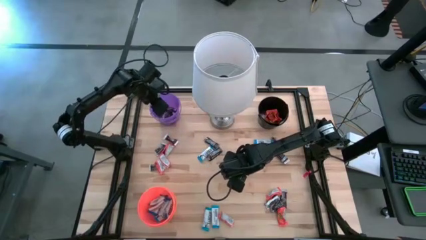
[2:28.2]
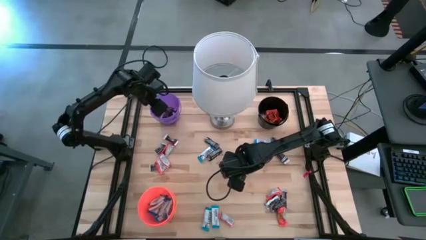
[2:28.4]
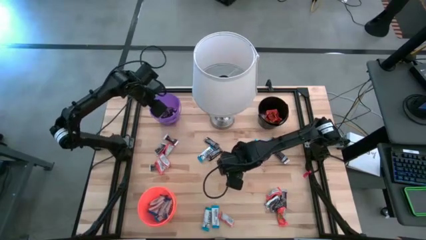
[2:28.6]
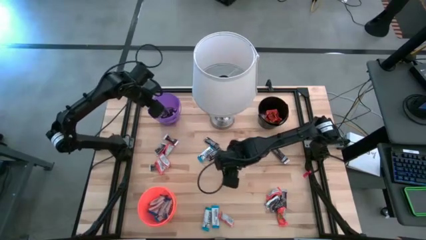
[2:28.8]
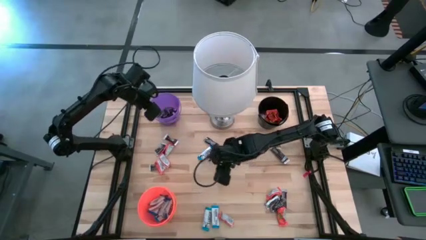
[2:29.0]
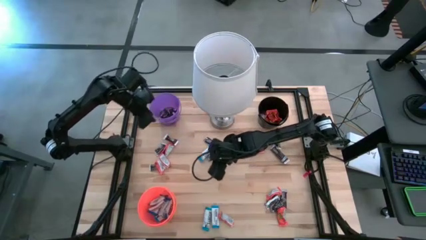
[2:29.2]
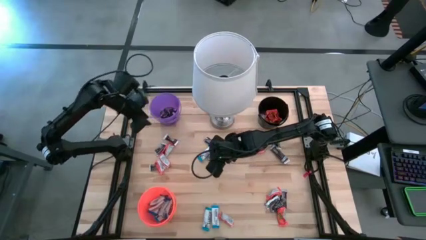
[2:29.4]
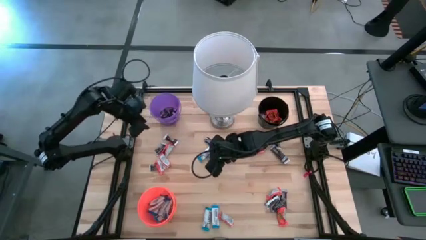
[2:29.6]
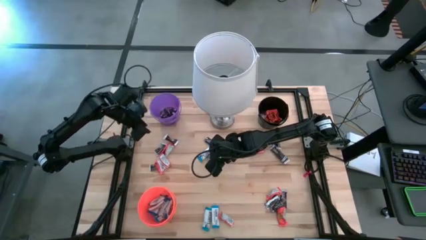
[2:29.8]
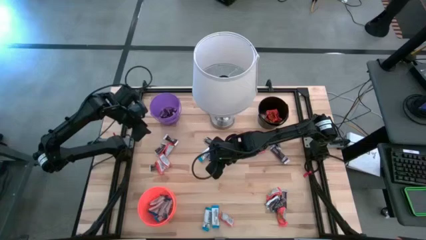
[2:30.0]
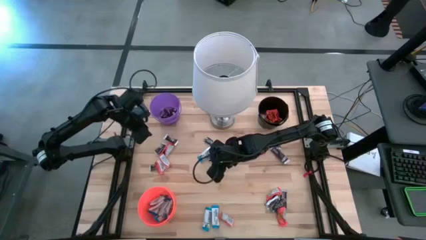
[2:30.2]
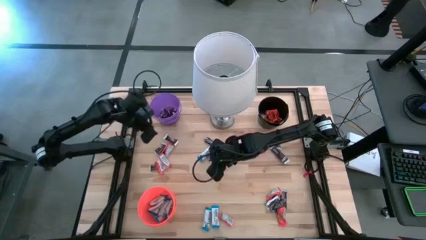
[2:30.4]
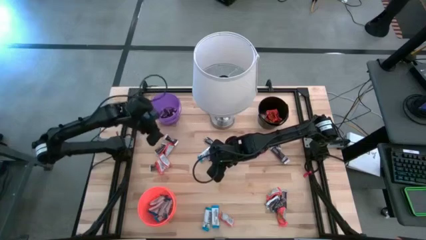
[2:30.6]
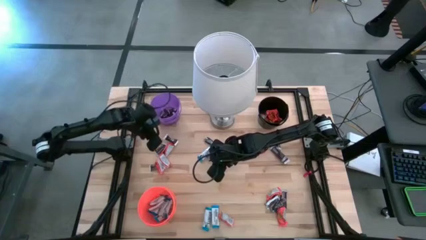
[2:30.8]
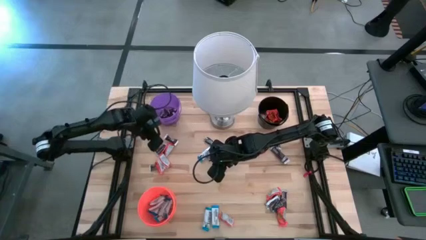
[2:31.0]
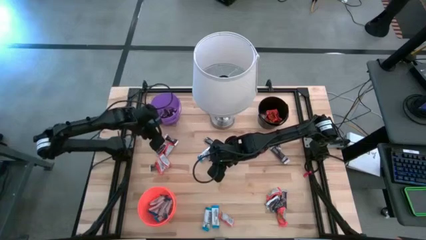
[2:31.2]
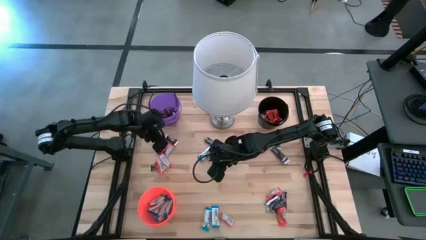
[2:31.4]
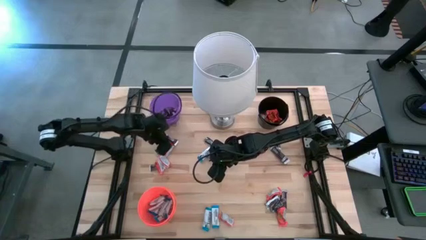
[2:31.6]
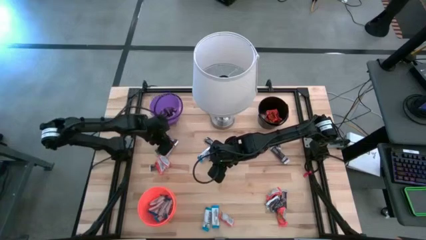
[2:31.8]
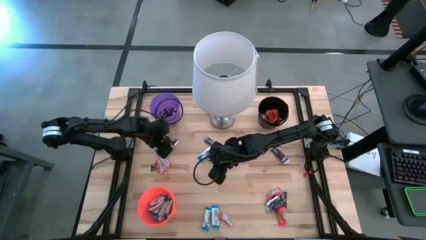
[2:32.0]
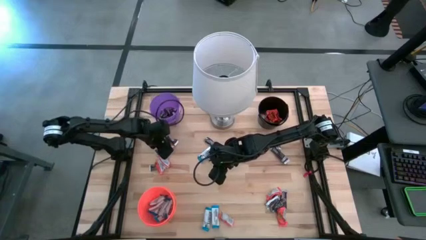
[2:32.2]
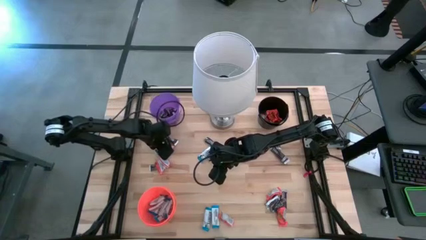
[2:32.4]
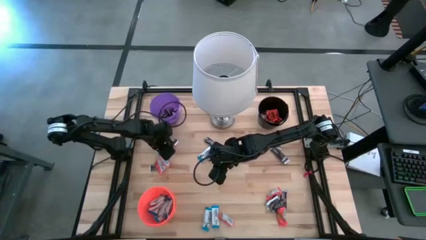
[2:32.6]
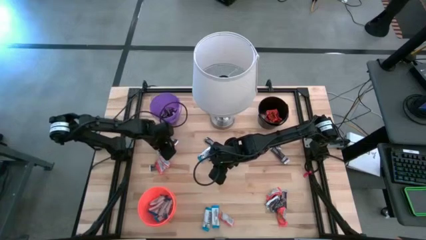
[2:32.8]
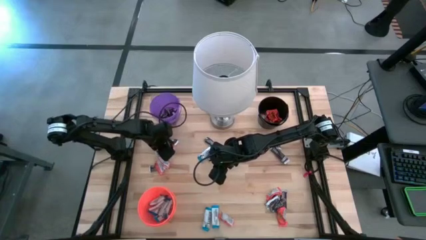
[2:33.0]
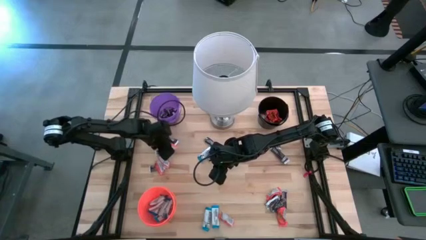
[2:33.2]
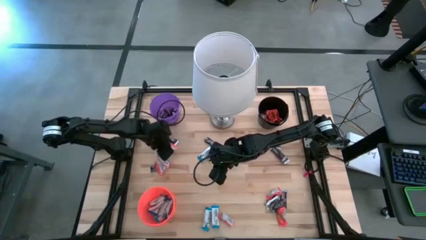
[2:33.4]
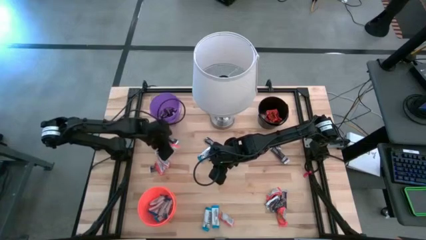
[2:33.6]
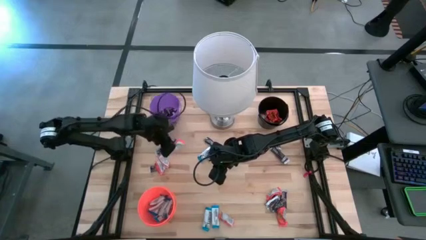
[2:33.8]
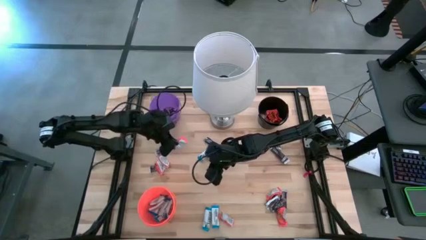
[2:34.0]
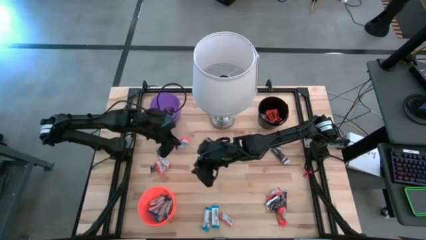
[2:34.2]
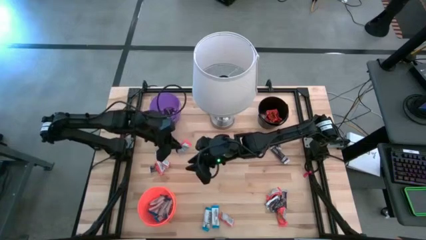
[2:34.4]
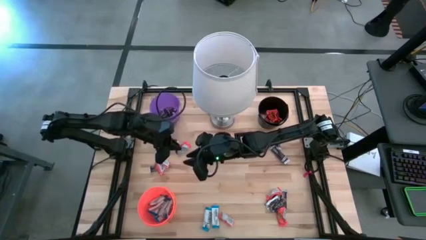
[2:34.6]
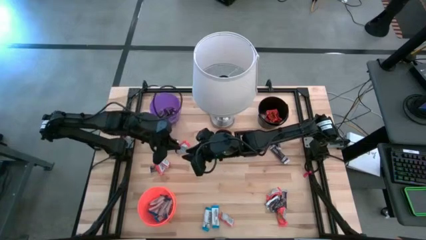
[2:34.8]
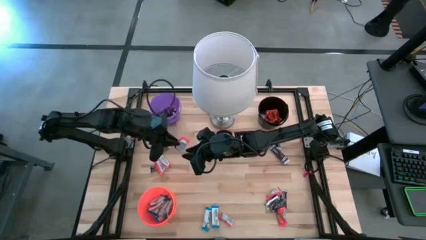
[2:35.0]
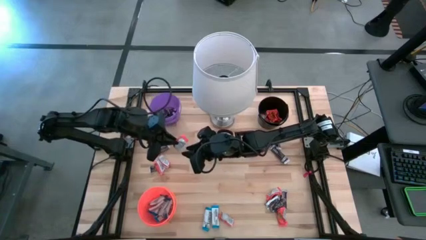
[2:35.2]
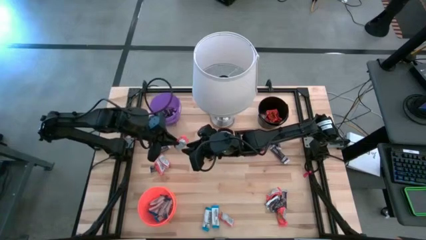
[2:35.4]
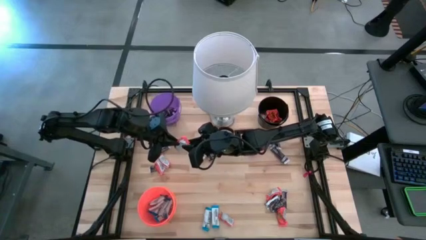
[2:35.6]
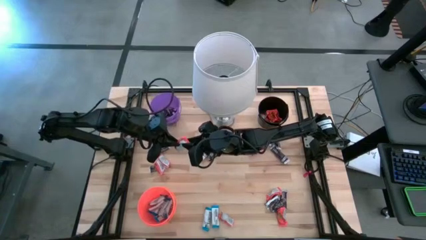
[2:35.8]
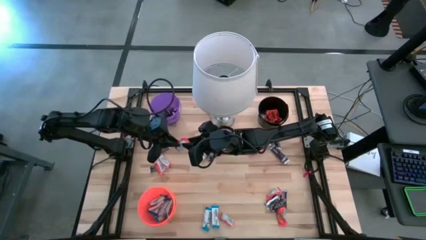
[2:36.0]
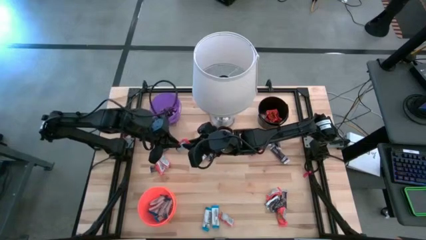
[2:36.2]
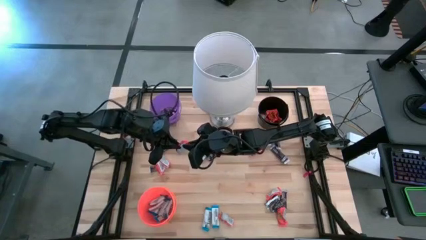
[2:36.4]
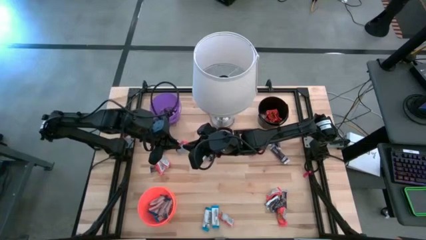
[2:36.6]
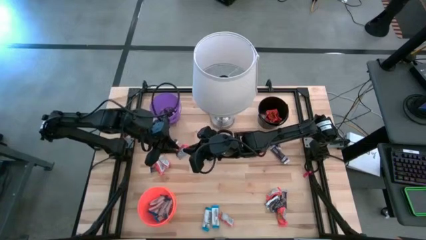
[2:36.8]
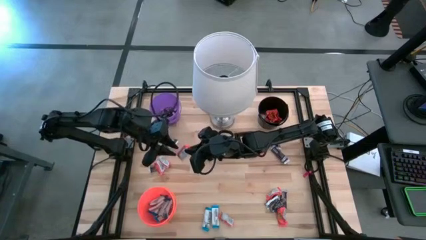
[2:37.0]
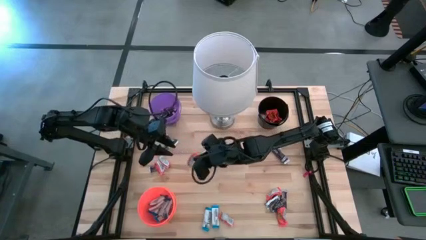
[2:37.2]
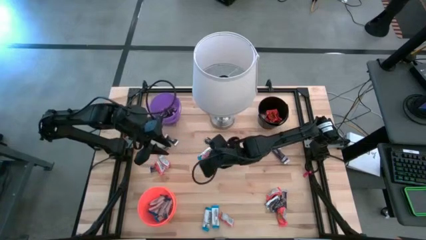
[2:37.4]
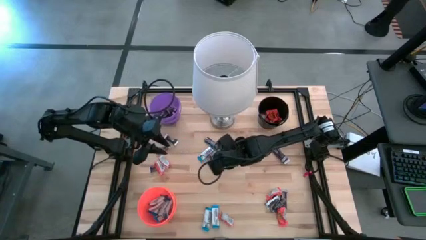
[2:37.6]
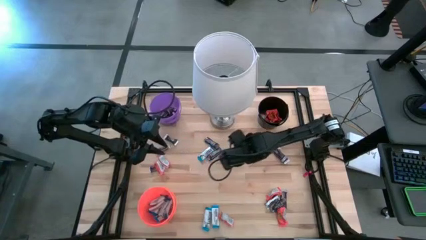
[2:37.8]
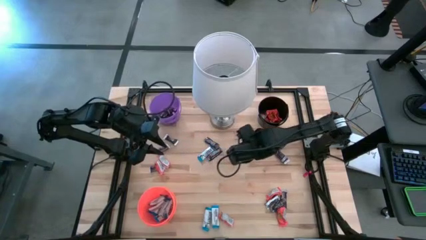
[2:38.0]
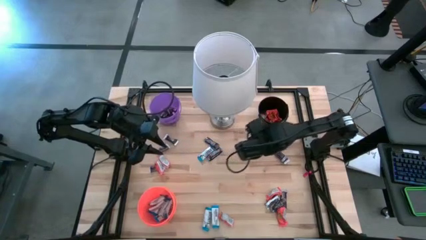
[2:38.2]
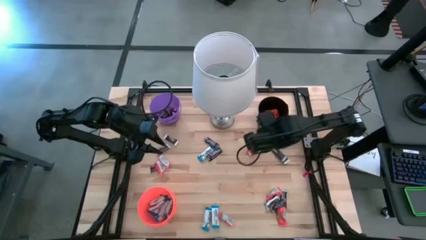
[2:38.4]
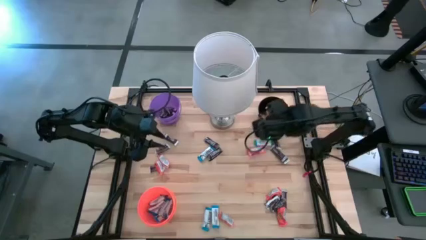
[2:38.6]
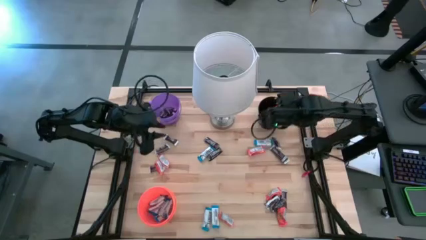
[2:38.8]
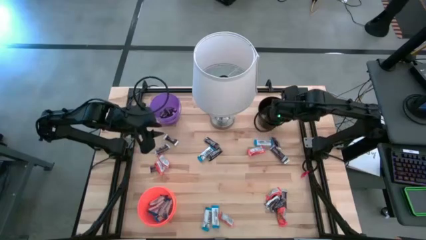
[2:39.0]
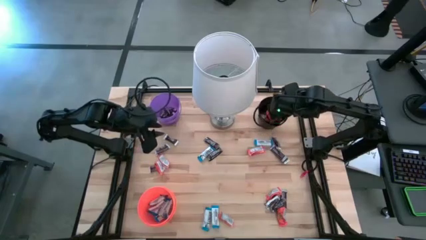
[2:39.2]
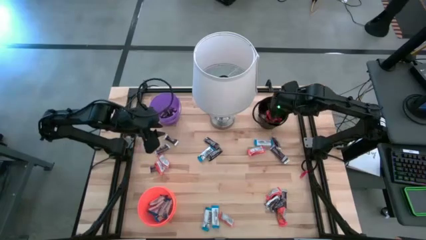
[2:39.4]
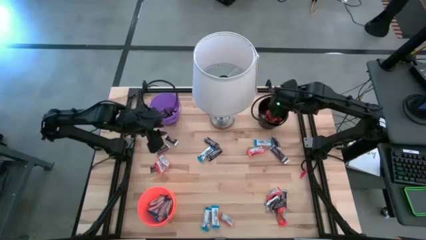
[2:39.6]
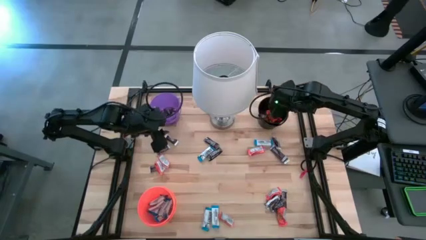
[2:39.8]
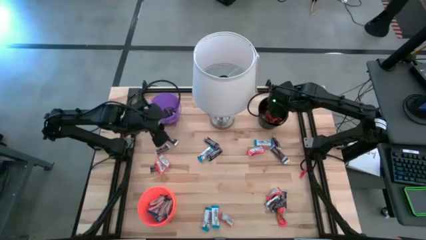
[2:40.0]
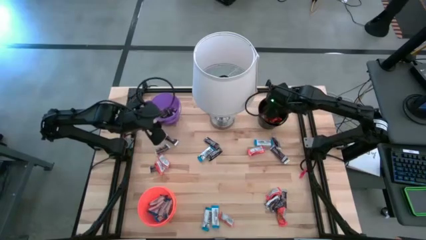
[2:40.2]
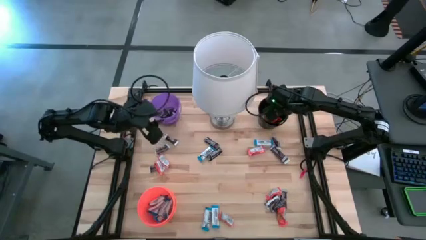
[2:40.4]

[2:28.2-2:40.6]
Task: Organize candy in baskets
Put the orange chocolate bar into the black bucket

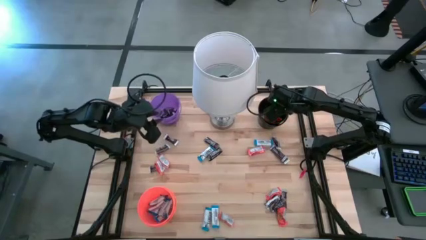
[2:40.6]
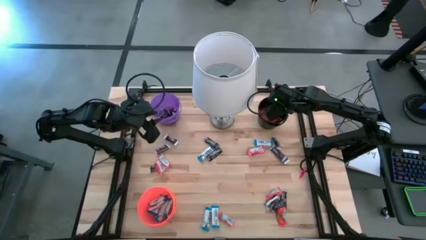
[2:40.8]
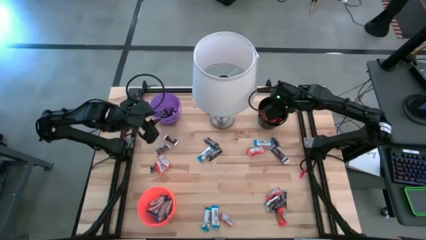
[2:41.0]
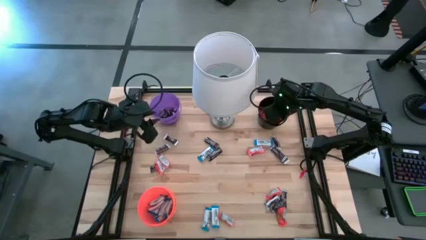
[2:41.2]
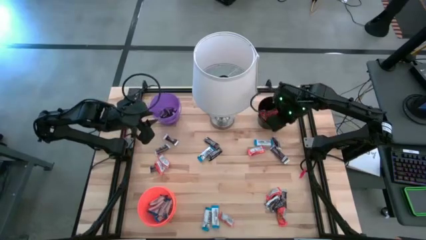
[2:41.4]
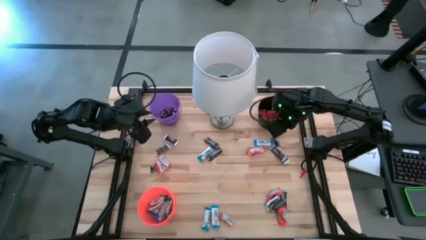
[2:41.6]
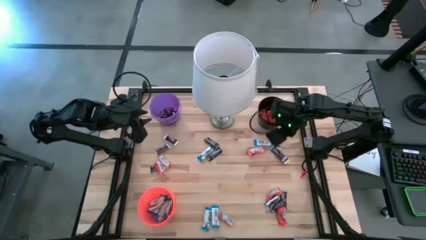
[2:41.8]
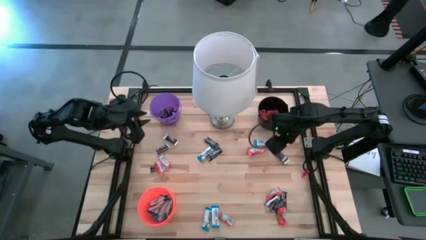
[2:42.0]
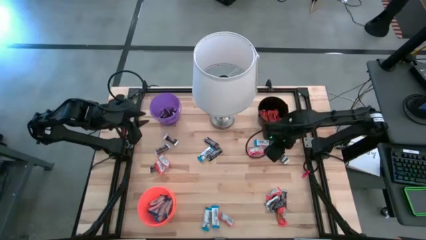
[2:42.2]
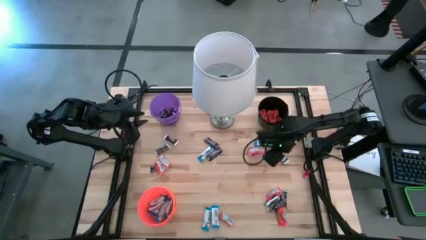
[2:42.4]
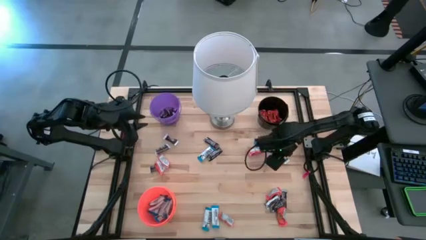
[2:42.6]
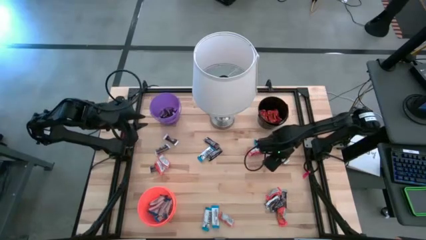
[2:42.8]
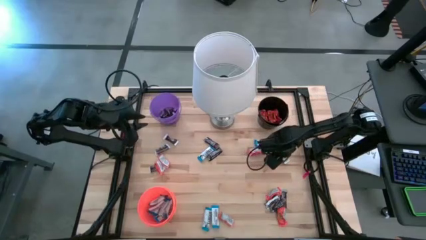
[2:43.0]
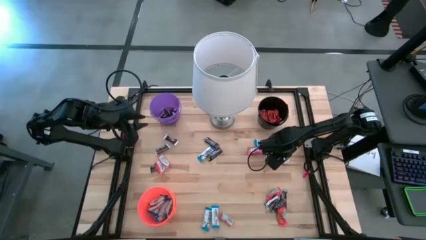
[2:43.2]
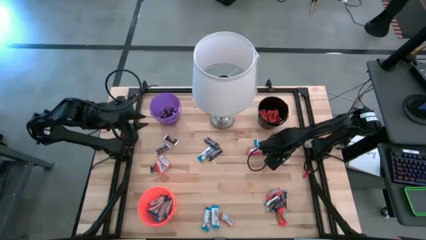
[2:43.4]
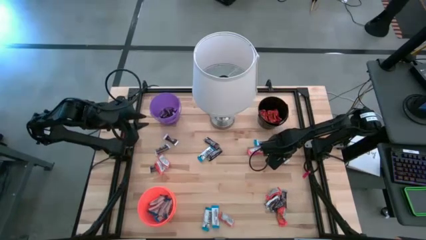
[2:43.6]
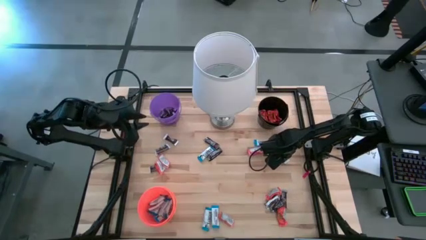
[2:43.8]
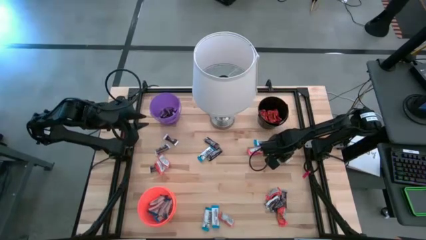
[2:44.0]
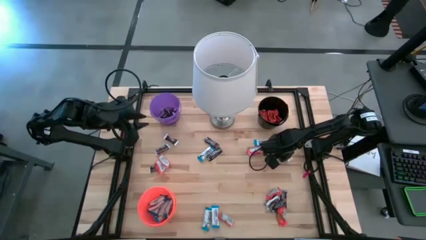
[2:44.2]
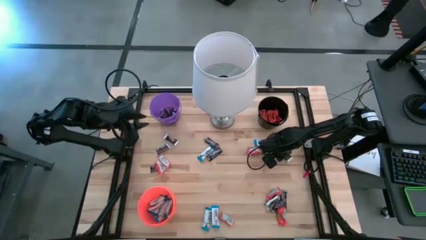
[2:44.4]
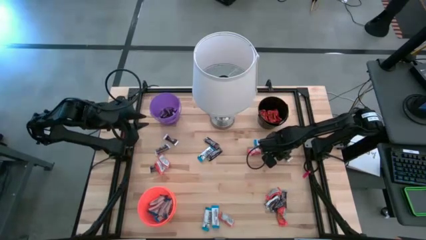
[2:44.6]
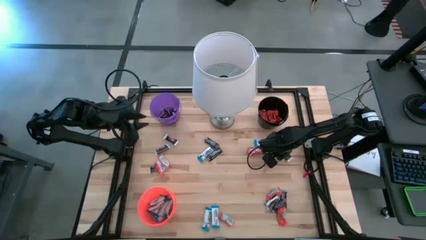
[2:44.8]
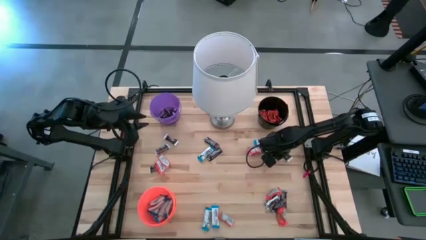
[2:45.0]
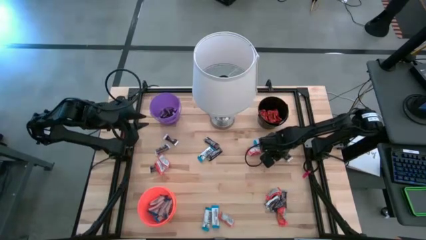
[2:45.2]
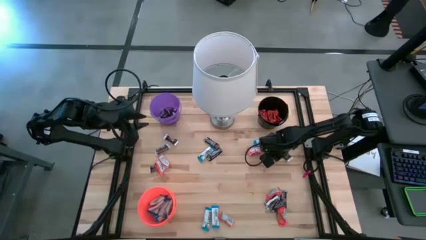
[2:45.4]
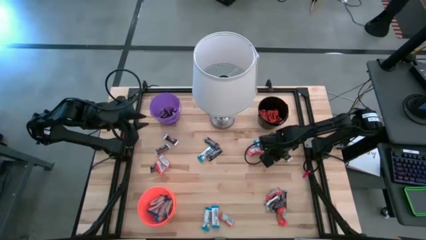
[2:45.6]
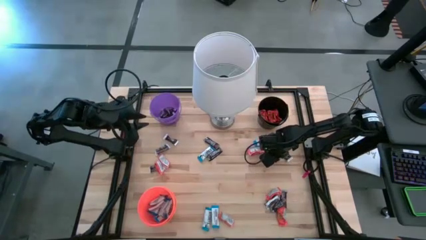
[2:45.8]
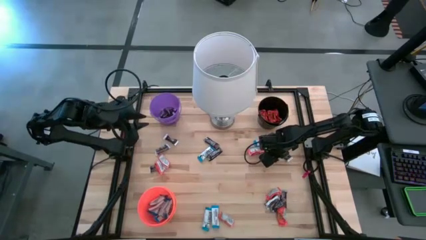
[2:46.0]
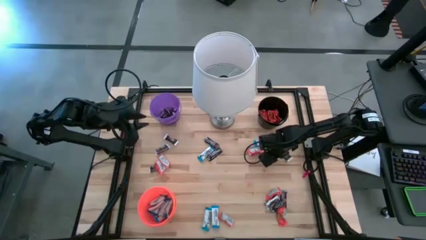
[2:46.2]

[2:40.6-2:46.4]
Put the brown chocolate bar into the purple bucket
